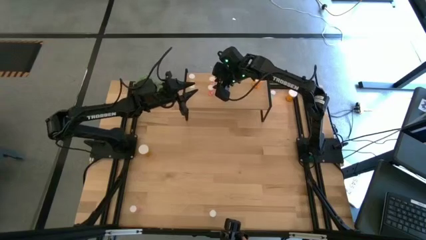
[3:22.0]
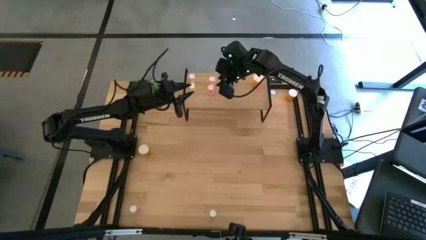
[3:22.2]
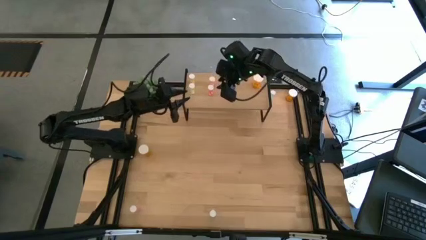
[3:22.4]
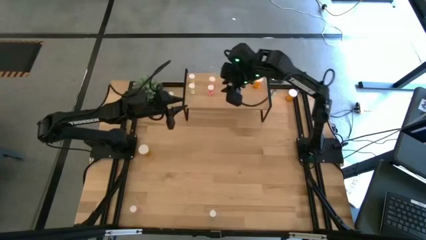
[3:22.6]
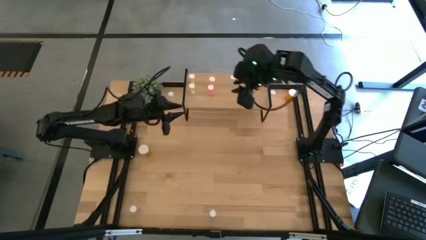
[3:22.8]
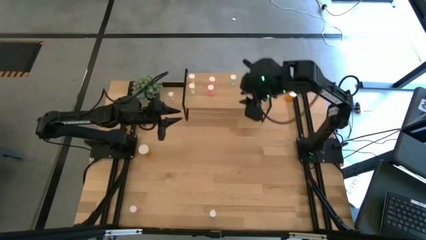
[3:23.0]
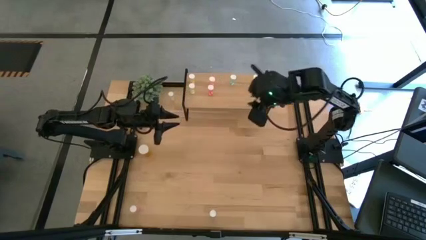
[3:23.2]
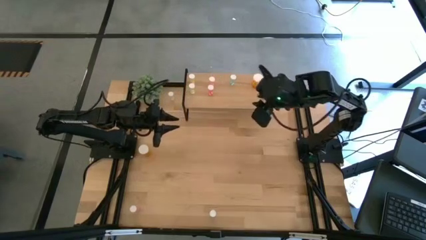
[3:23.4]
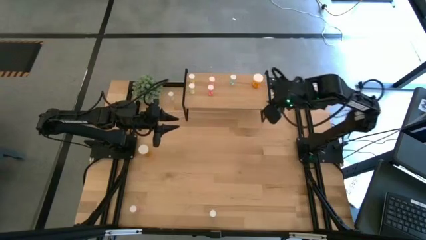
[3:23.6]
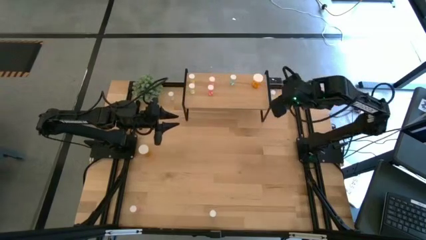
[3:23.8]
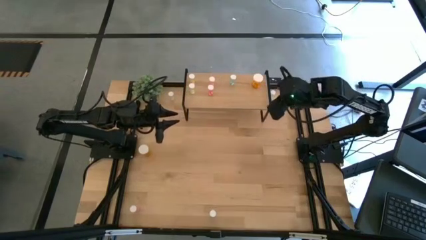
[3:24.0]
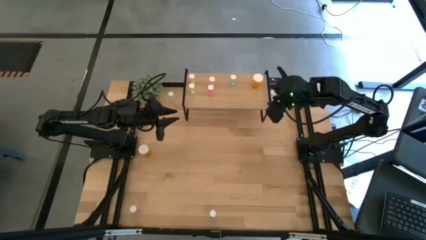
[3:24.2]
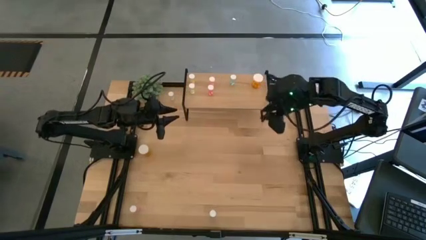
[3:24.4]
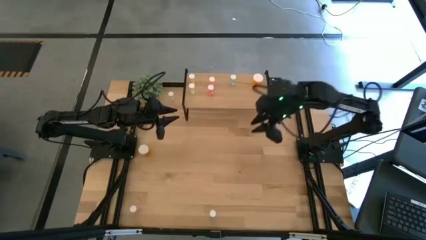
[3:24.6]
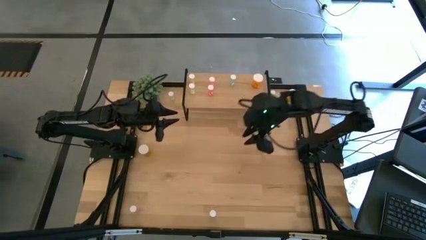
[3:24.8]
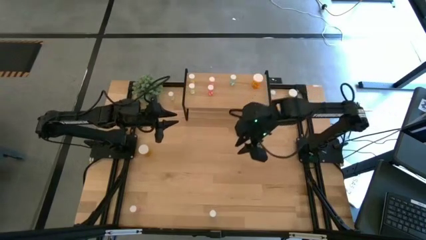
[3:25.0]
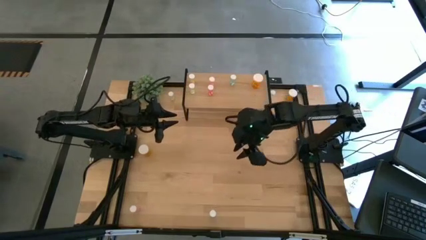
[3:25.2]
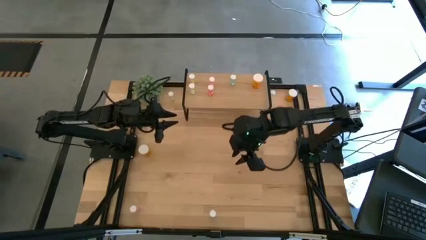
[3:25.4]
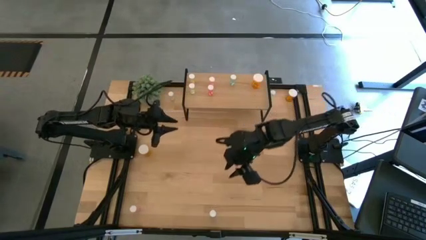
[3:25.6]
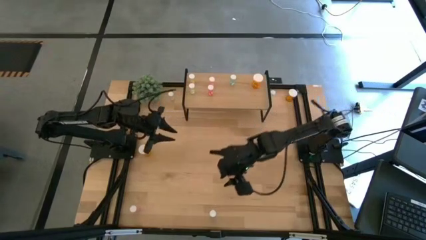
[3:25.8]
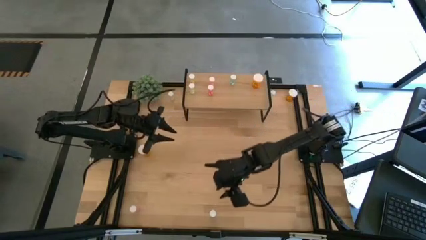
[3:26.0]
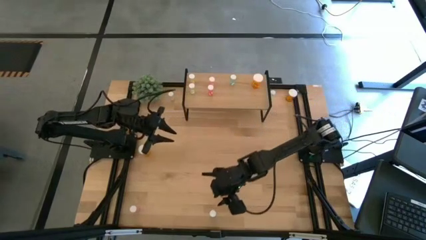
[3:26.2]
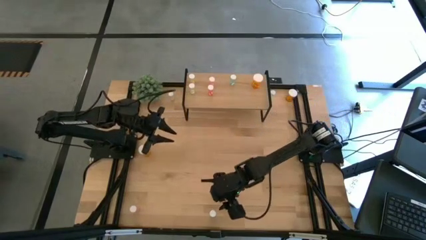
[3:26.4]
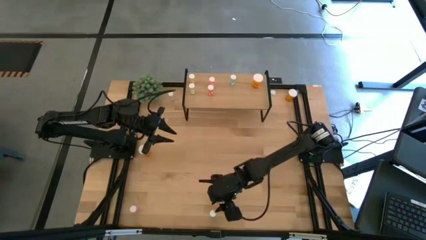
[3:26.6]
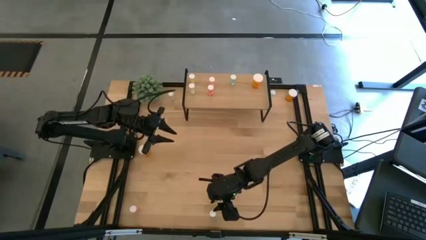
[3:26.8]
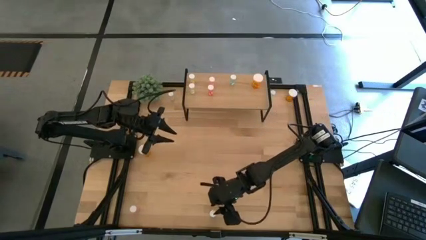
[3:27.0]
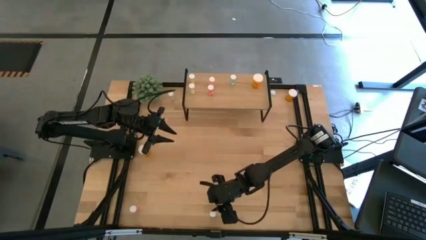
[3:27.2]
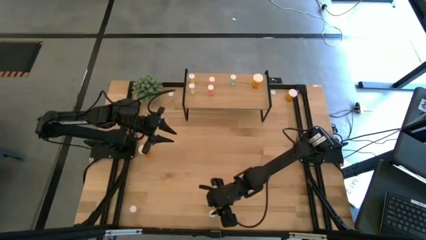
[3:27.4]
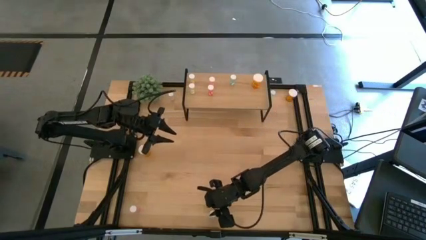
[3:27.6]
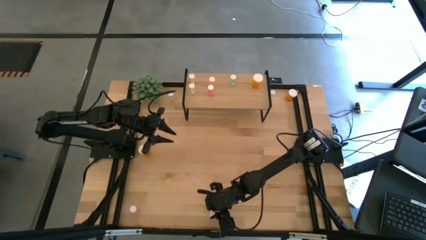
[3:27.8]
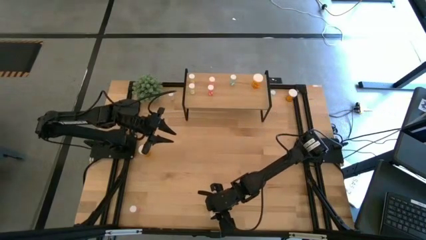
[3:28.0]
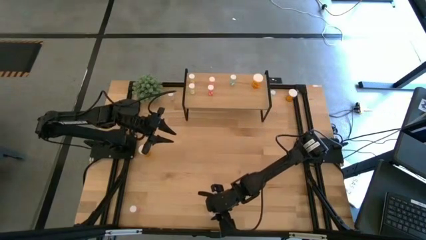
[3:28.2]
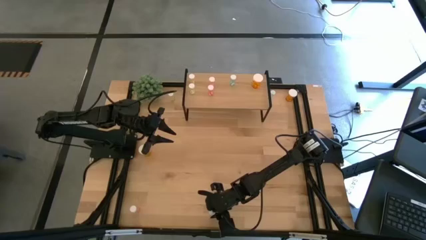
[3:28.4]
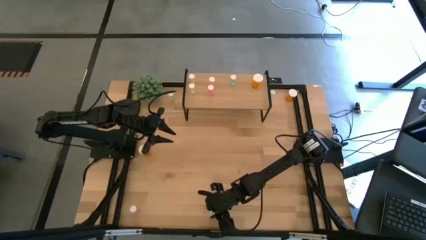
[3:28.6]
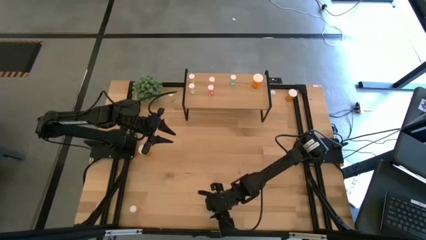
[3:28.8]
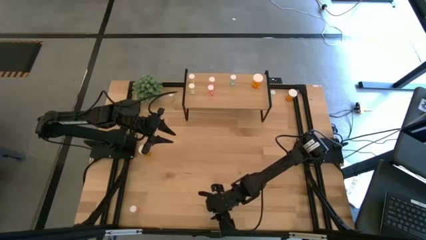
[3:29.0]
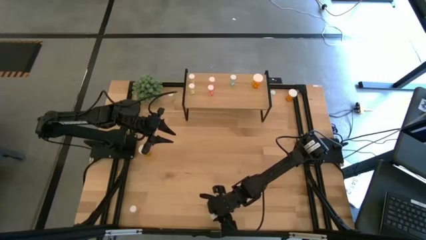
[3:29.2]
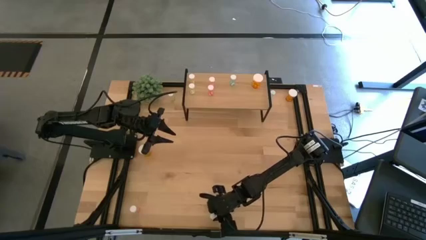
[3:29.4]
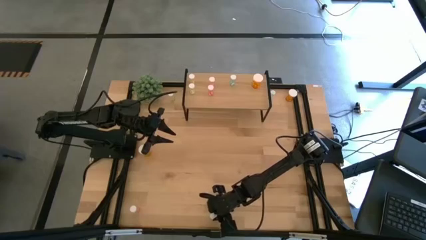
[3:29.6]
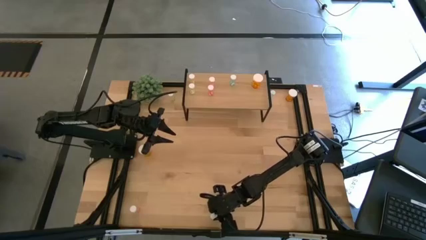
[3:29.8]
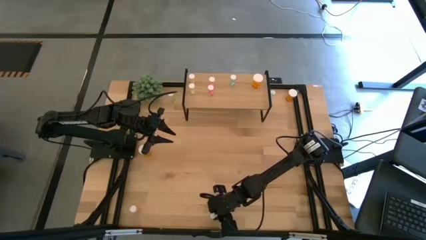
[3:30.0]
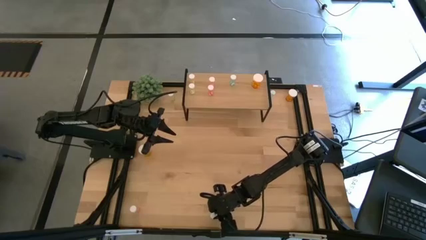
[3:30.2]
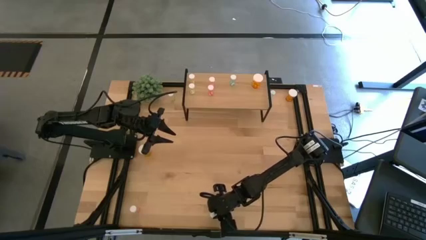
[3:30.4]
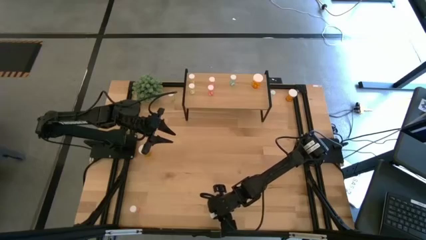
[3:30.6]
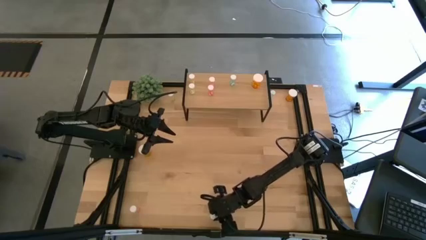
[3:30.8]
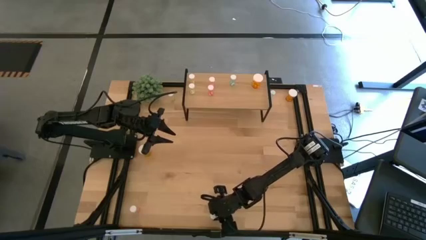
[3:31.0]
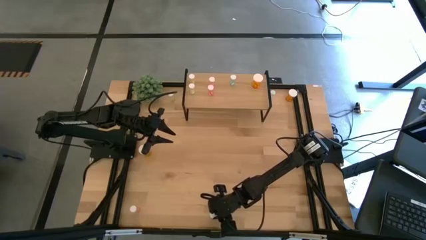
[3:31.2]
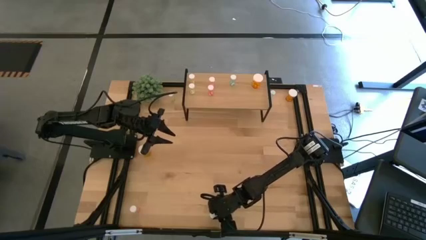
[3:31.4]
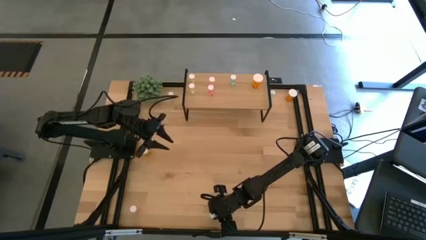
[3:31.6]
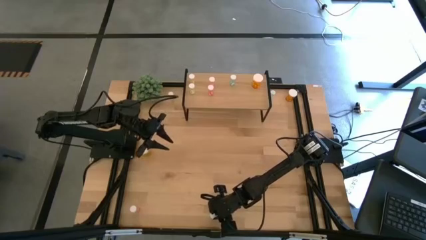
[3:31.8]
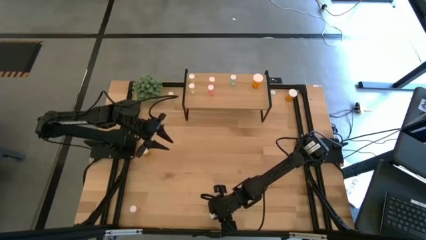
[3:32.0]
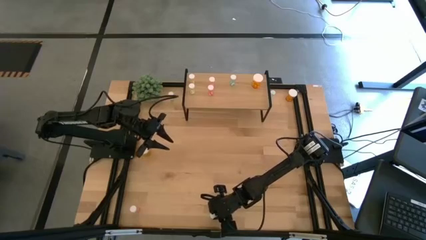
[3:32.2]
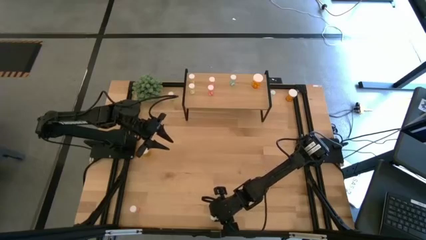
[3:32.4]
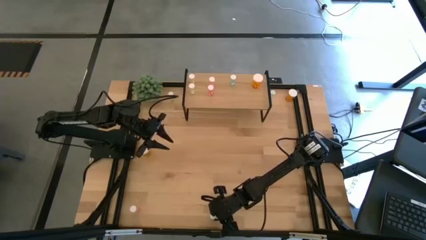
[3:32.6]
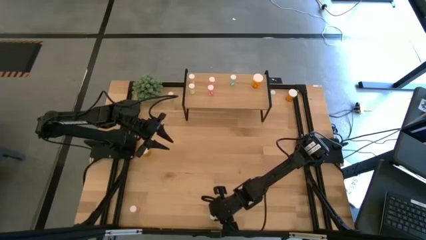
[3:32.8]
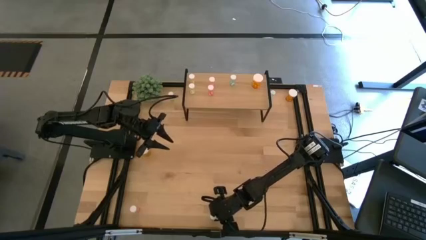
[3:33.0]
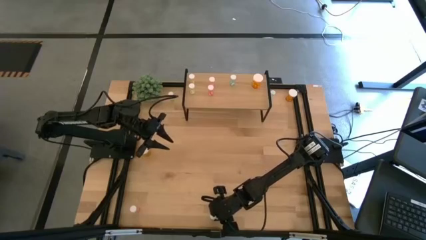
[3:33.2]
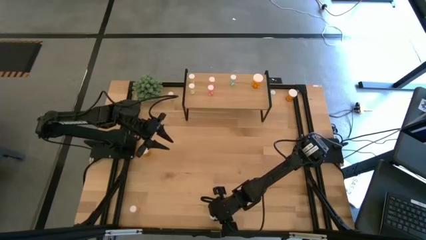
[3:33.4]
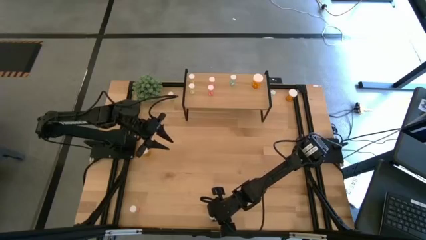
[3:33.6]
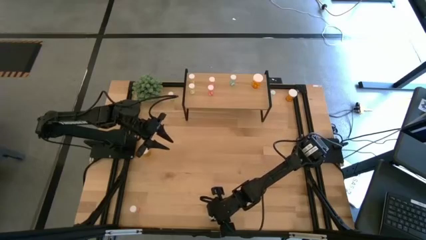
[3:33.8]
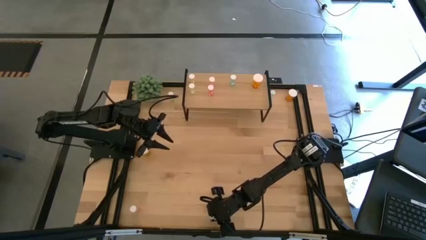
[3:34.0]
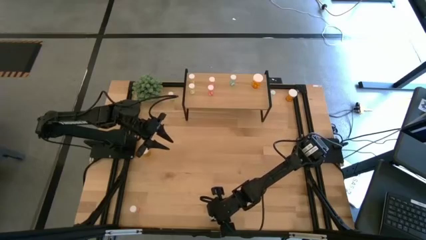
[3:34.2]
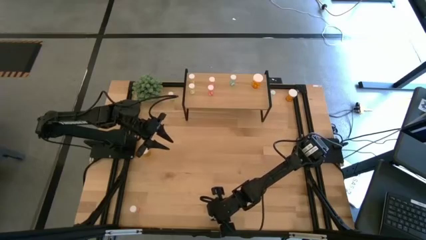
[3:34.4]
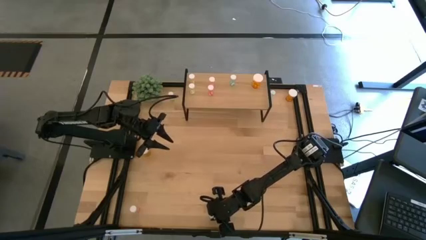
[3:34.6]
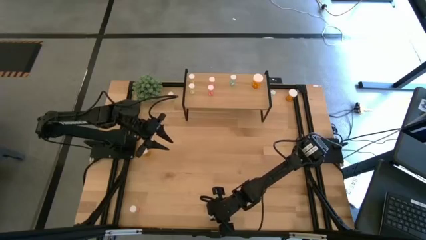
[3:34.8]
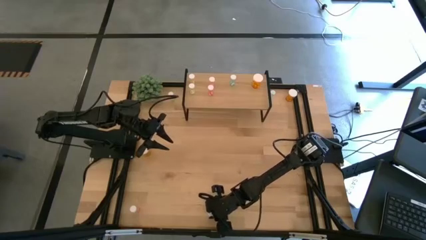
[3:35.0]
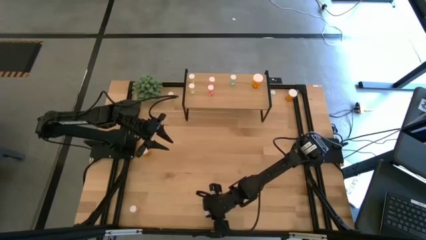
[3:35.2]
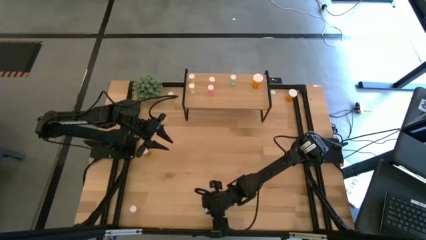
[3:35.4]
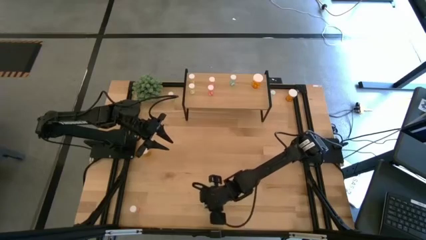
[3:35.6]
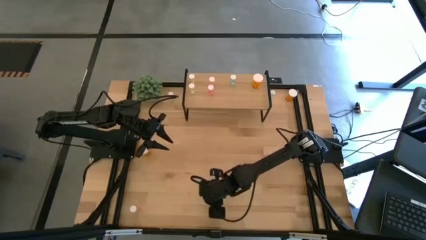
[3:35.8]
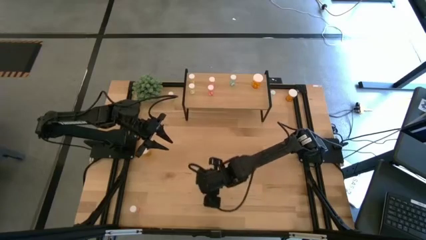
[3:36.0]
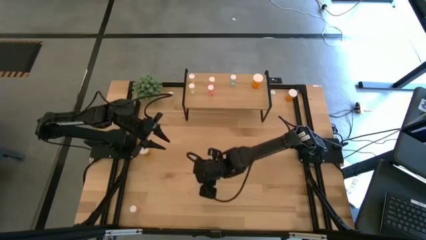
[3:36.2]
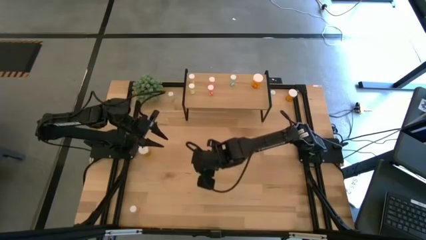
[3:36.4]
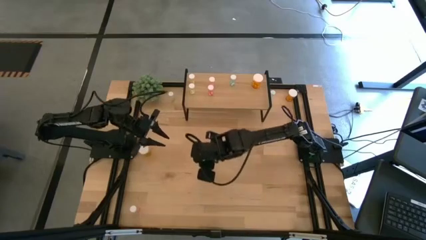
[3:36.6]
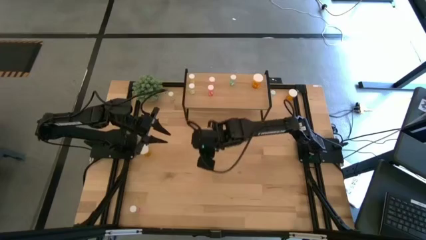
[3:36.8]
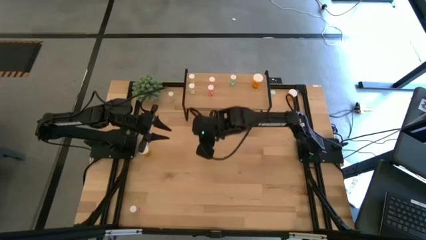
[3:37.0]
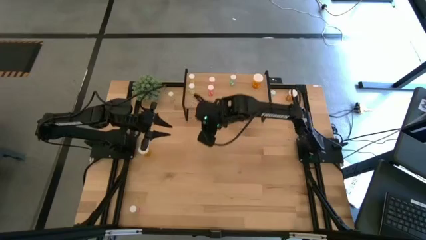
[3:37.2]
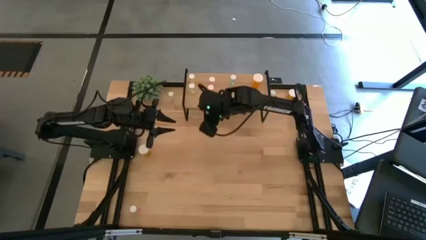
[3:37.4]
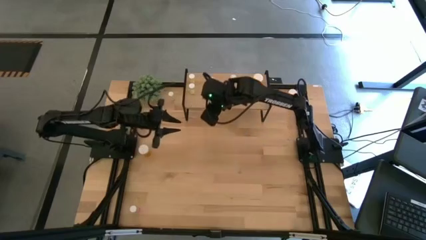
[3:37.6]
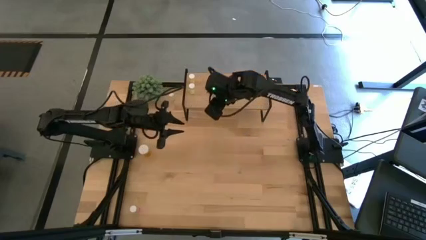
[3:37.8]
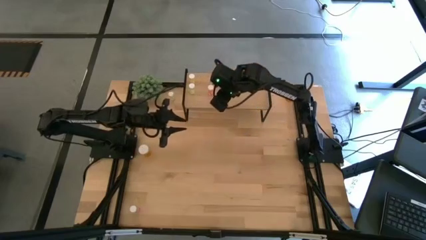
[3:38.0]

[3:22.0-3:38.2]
Task: Pick and place medicine bottles onto shelf by color
Put the bottom blue pill bottle on the shelf aligned with the other blue pill bottle
